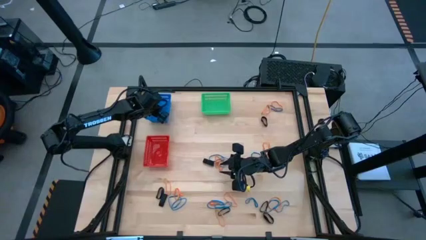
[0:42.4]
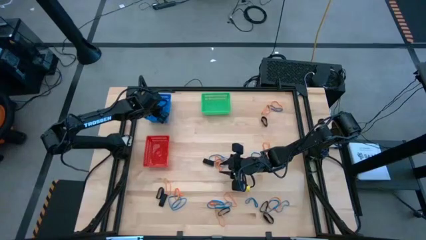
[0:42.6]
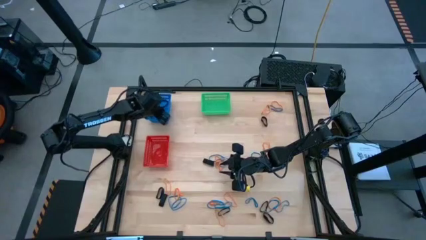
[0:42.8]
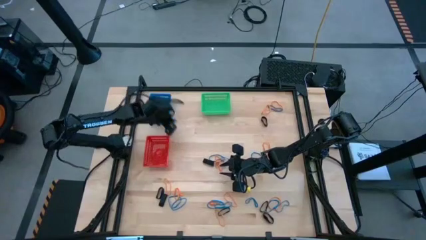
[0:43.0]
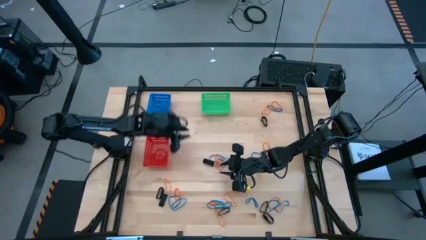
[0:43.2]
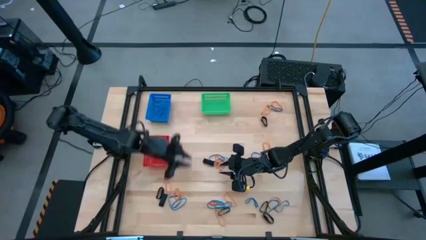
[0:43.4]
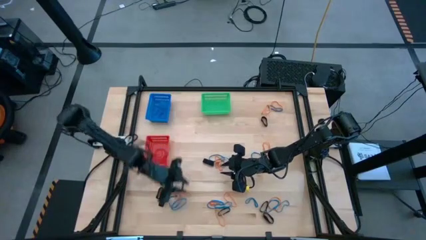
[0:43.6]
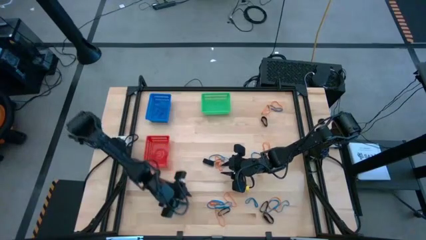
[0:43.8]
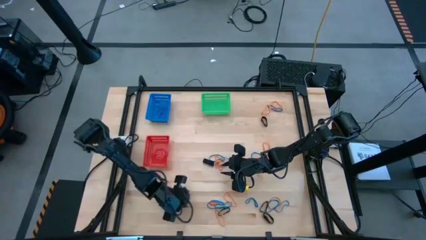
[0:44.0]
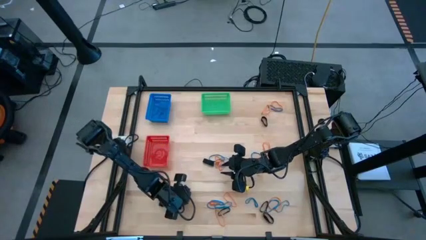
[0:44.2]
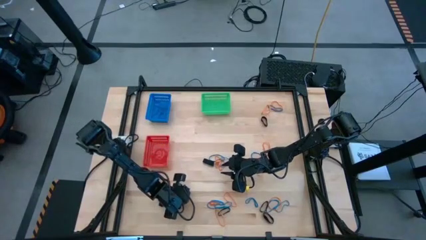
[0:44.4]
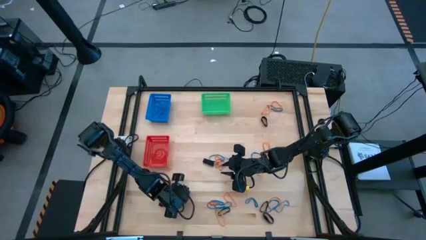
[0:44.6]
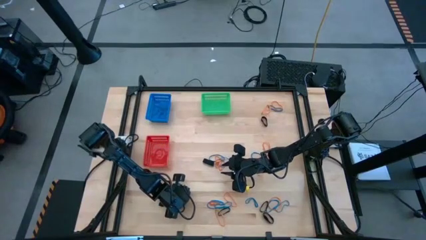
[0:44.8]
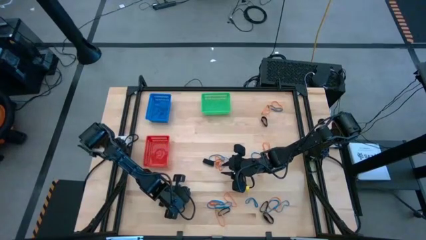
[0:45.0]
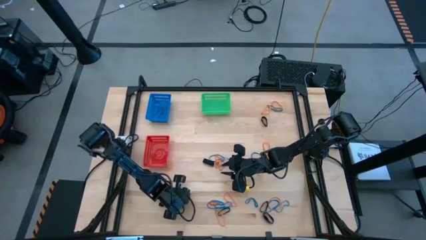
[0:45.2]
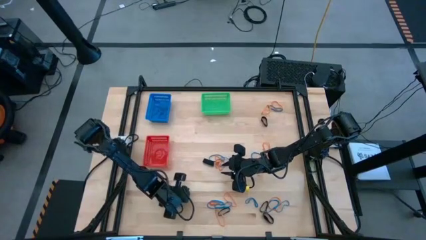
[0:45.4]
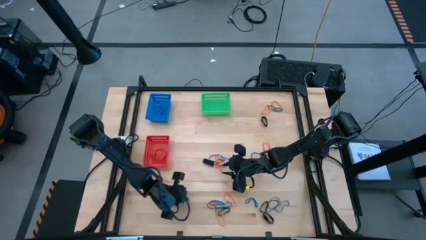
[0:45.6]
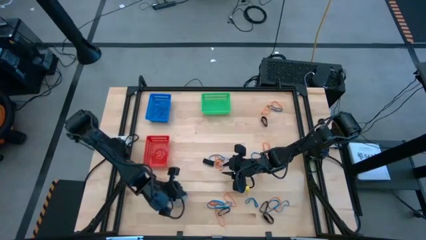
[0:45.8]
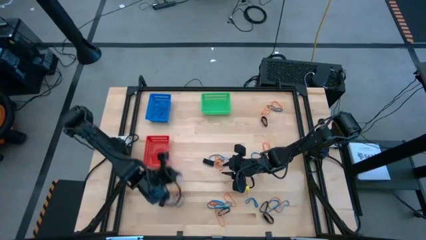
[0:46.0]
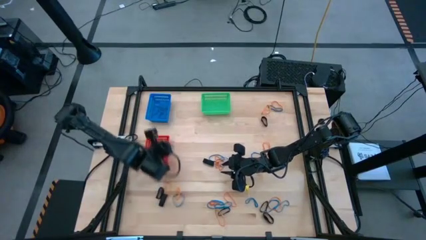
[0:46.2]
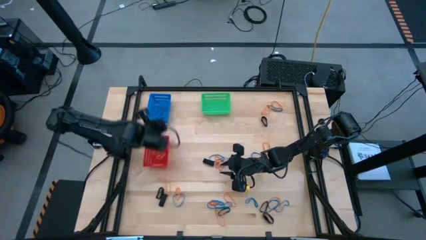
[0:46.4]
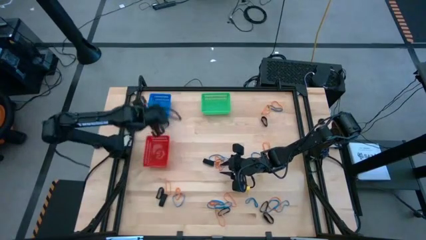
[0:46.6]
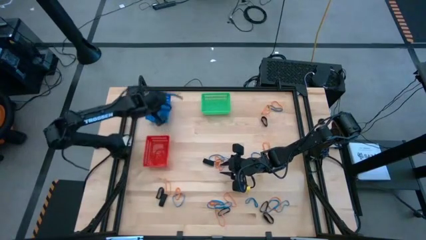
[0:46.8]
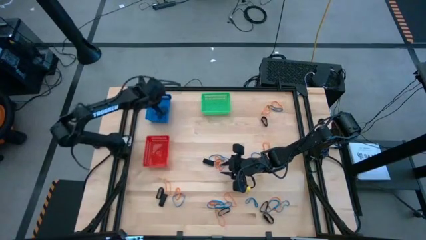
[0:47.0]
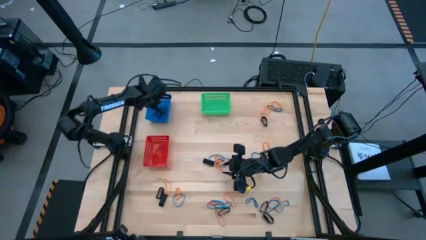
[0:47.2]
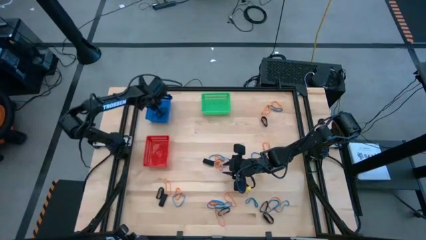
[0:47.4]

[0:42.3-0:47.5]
Task: Sort rubber bands into baskets
Put the blue rubber band into the blue bin

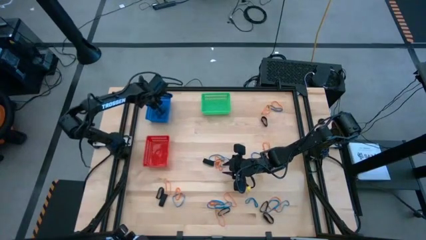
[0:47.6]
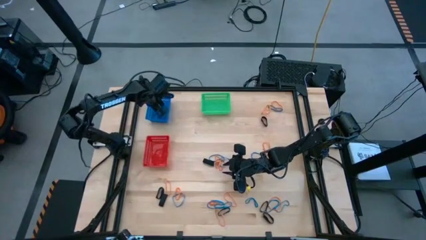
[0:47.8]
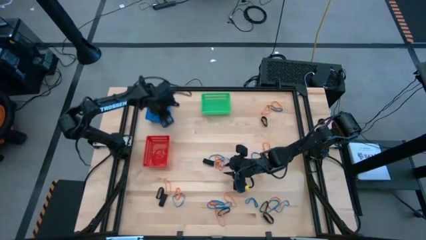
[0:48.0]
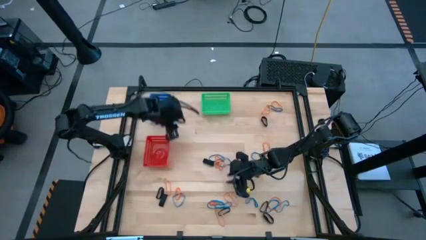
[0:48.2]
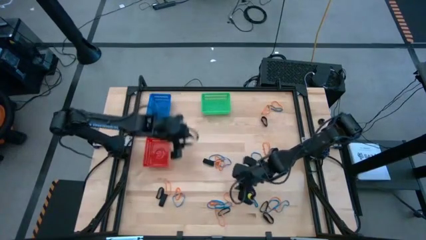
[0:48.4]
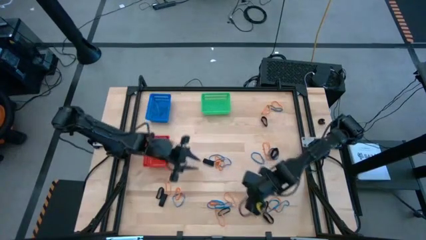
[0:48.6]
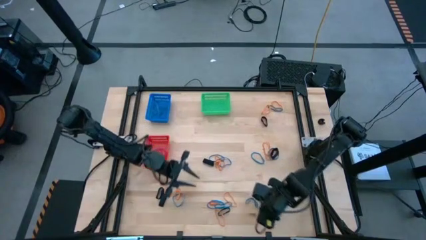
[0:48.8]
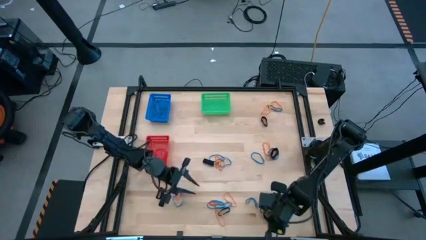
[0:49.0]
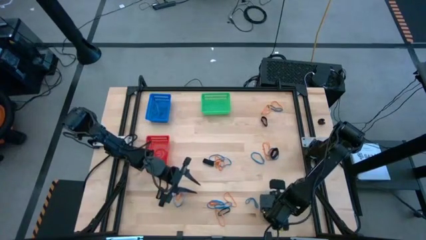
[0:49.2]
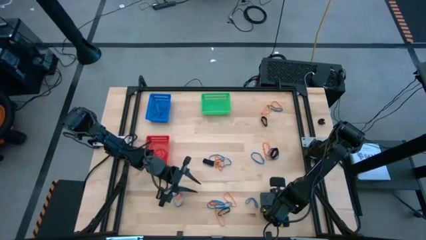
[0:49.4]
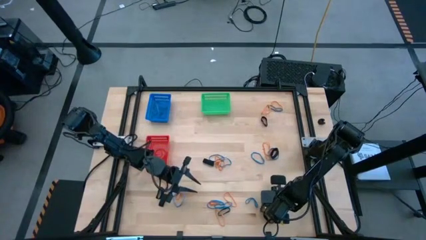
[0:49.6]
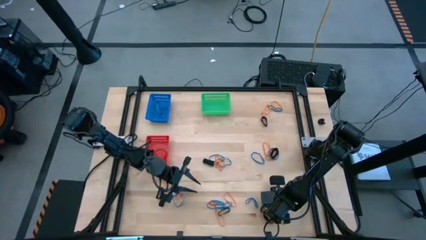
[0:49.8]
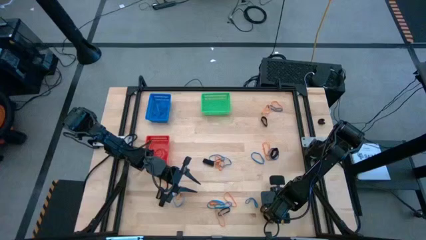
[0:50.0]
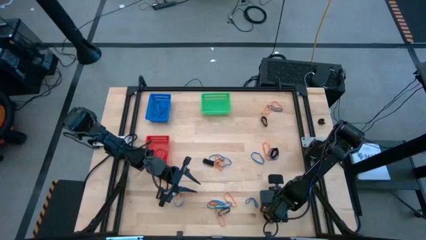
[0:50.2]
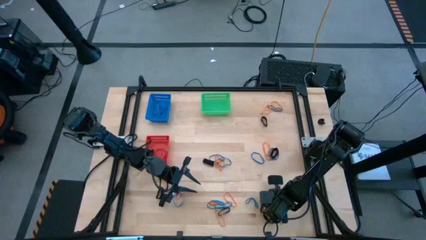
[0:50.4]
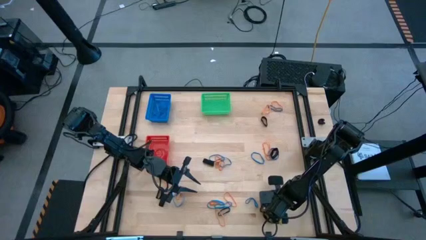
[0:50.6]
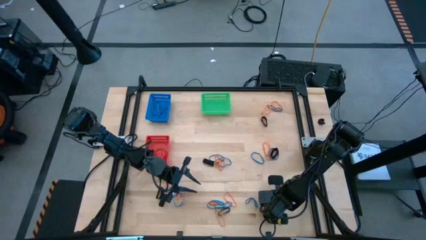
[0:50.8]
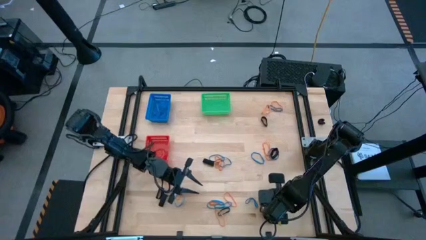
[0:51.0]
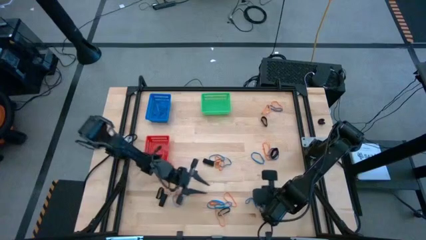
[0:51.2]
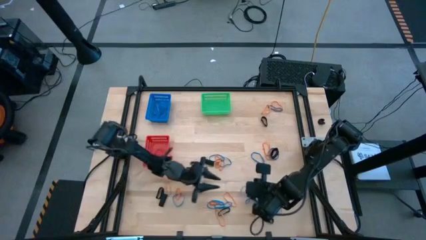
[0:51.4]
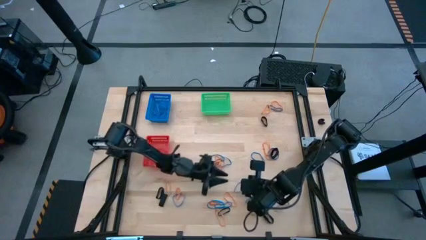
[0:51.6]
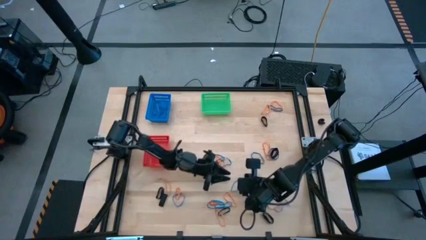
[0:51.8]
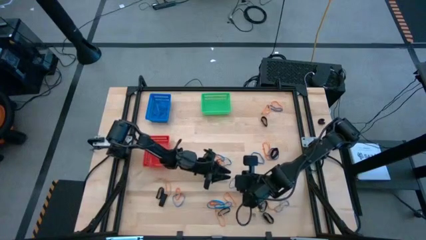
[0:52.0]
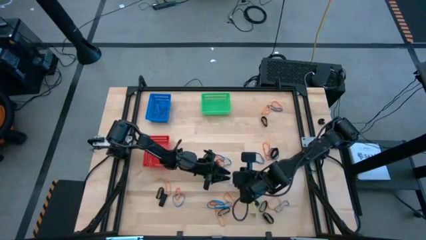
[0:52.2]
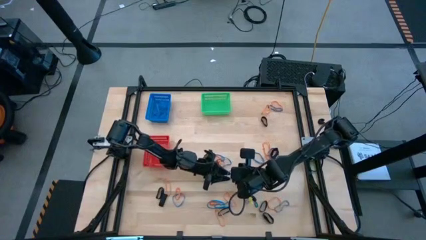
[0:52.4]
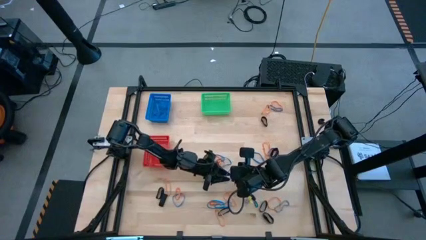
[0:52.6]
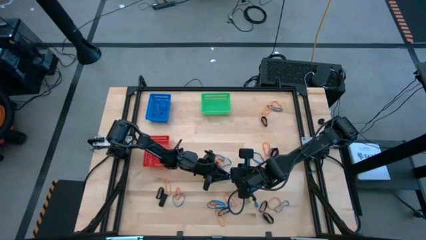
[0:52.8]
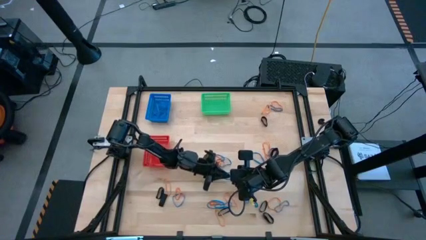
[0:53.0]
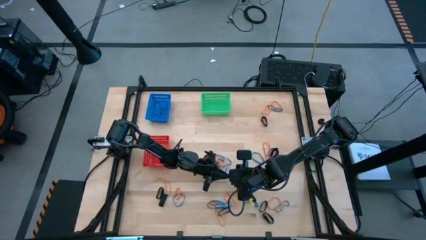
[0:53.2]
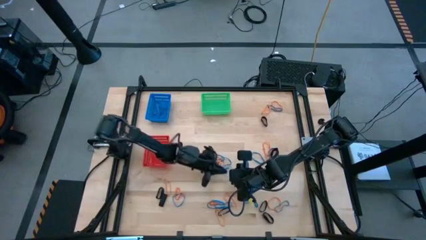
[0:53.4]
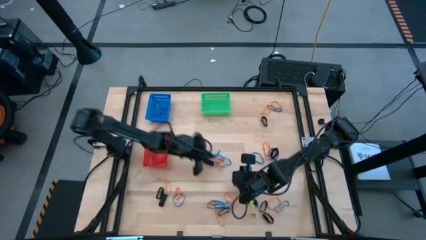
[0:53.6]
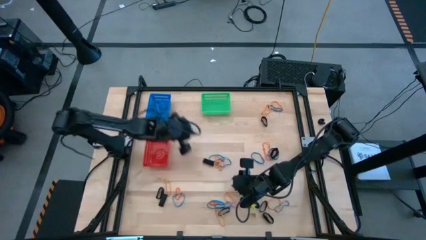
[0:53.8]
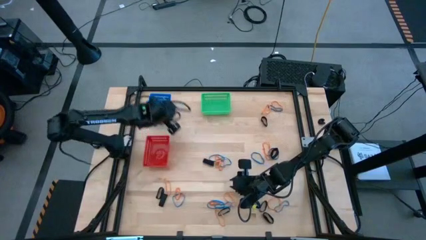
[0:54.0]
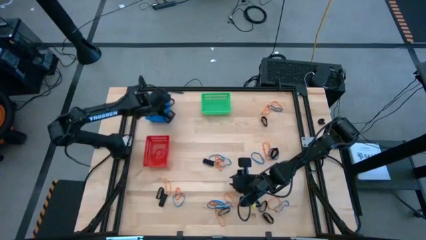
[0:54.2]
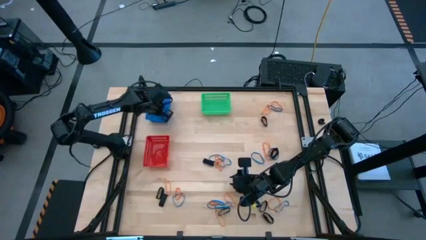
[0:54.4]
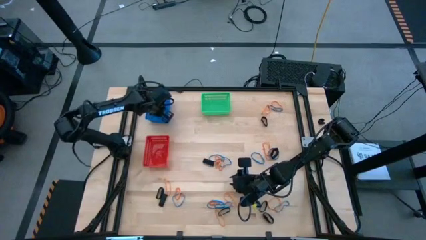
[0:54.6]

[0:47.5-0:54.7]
Put the blue rubber band into the blue bin

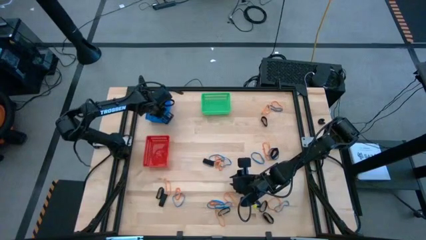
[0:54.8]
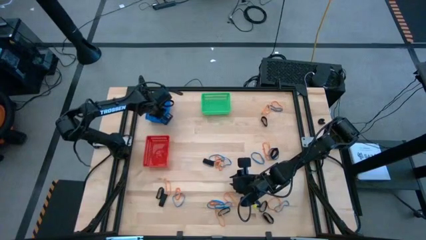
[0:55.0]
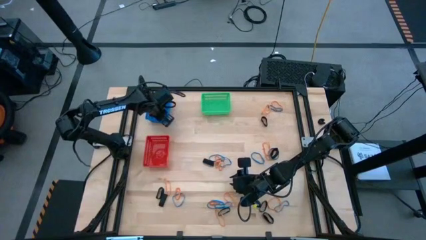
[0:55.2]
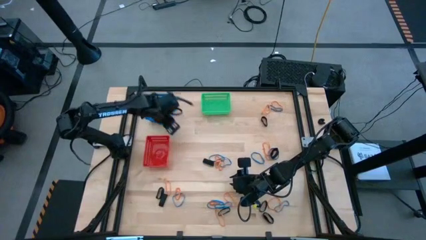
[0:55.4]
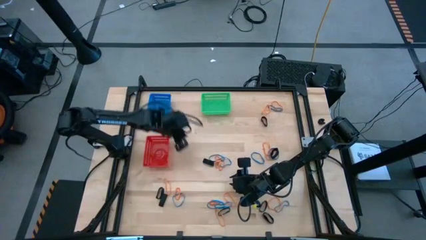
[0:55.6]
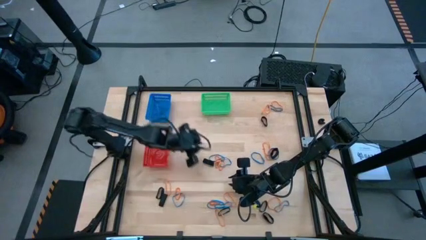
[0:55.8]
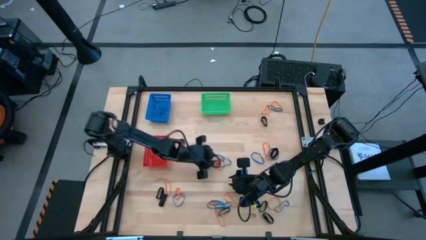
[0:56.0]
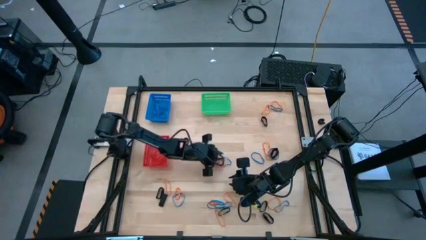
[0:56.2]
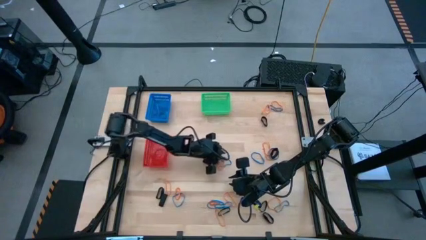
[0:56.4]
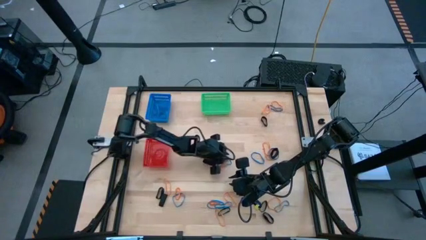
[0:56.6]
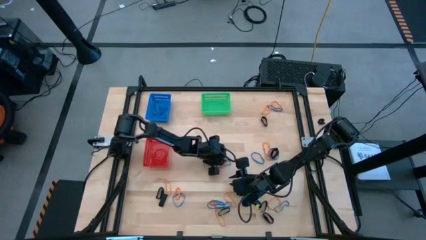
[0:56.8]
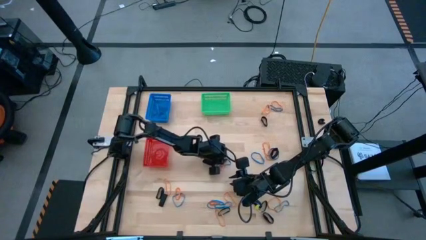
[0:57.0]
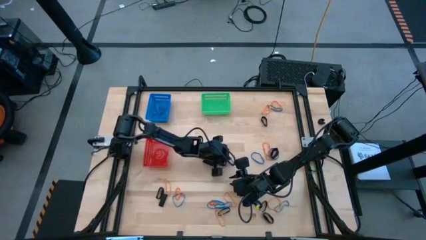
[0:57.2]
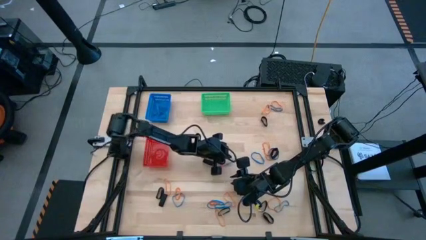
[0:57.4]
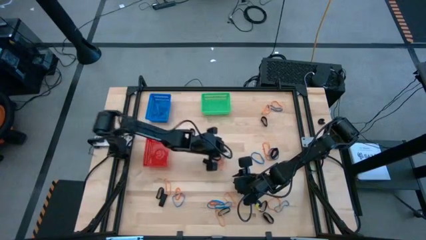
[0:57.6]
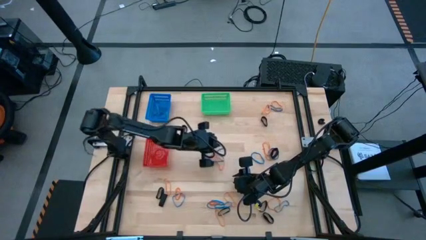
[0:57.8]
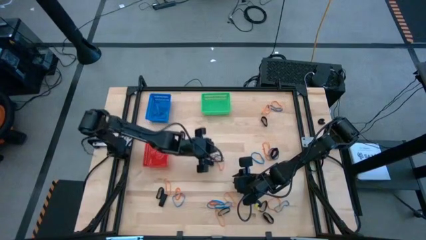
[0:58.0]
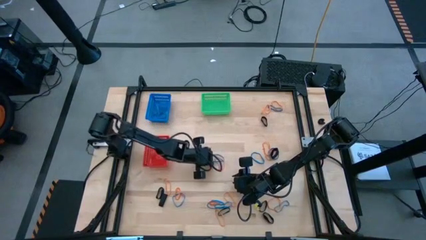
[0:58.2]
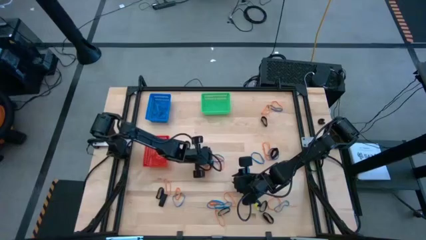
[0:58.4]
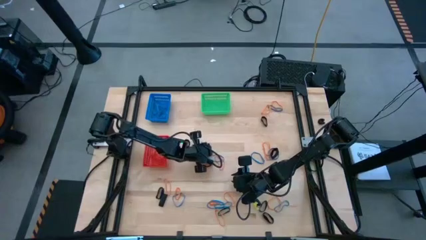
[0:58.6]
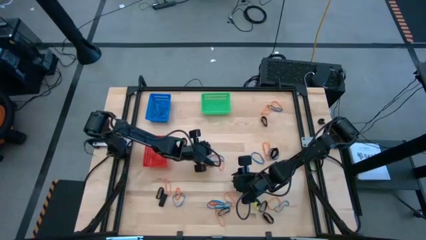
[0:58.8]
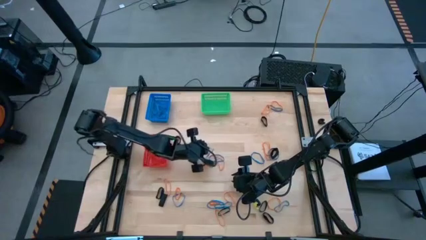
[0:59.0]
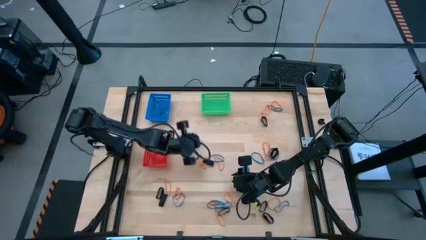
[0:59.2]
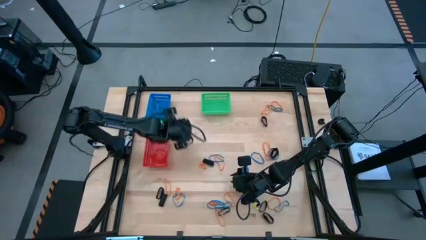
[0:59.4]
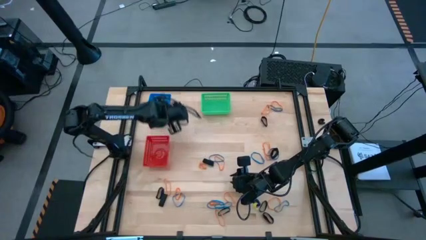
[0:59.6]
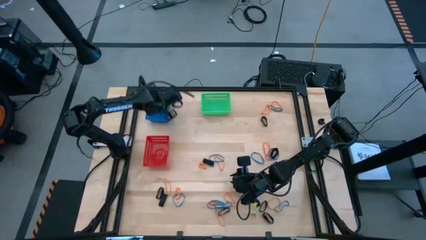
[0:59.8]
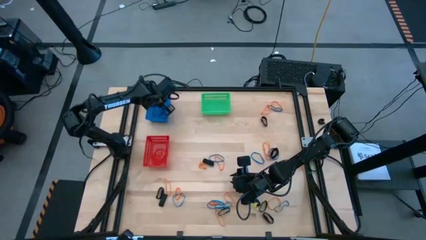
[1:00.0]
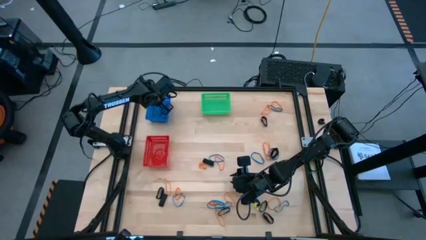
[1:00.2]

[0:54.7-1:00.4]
Put the blue rubber band into the blue bin
